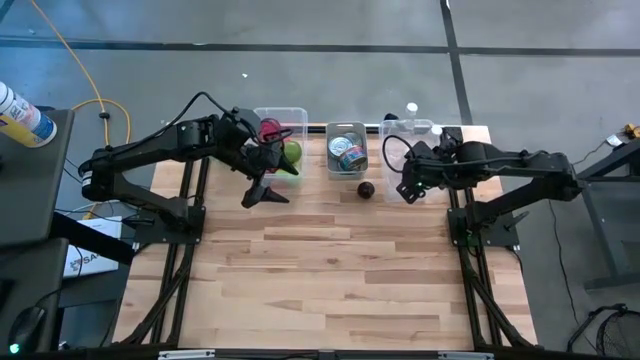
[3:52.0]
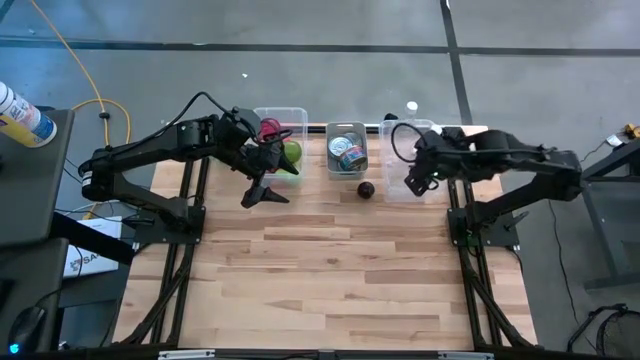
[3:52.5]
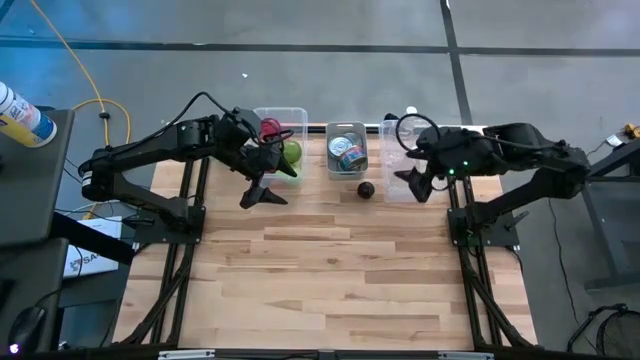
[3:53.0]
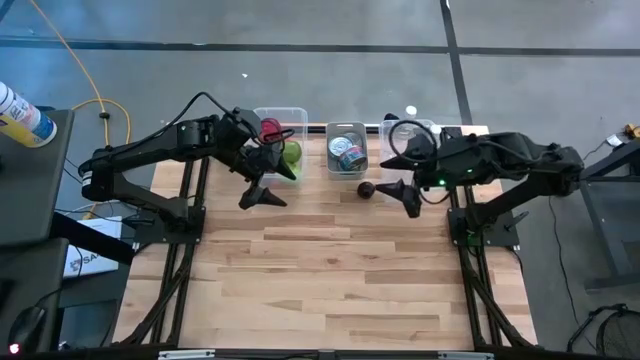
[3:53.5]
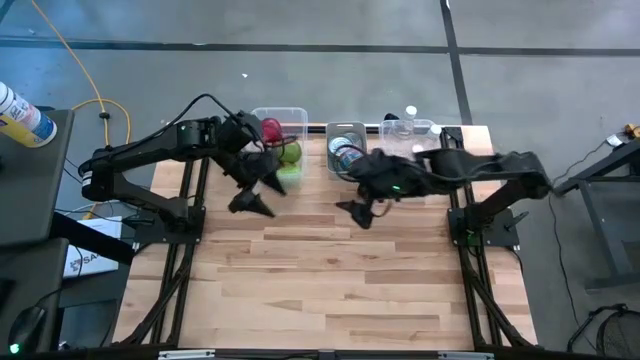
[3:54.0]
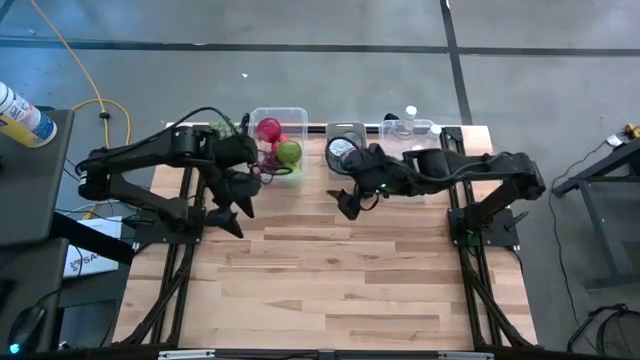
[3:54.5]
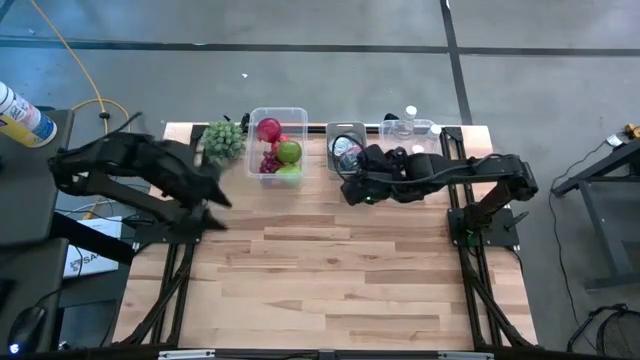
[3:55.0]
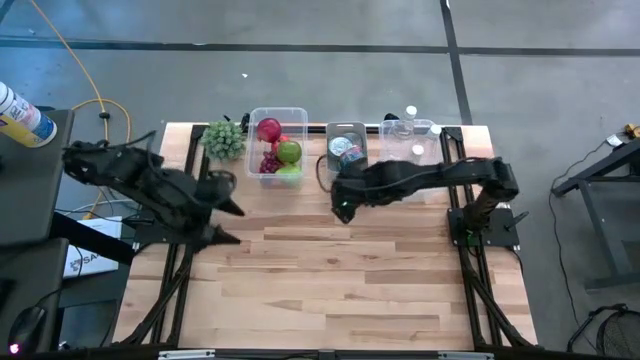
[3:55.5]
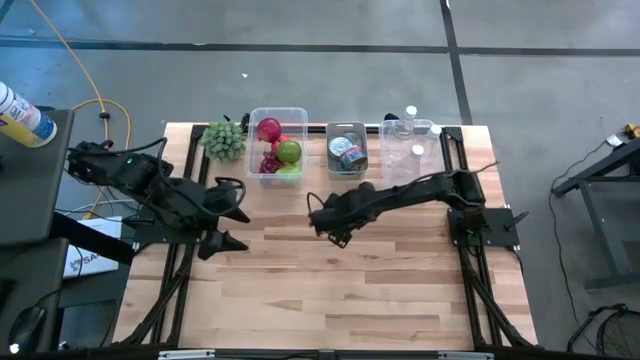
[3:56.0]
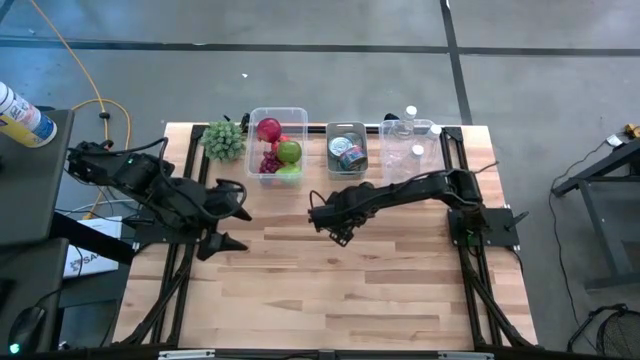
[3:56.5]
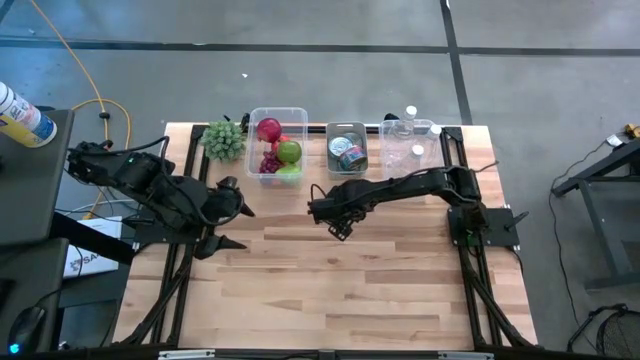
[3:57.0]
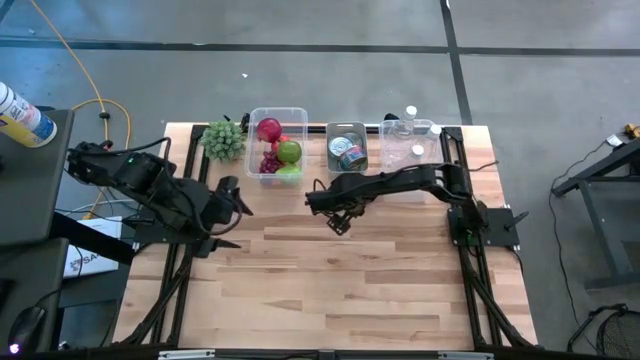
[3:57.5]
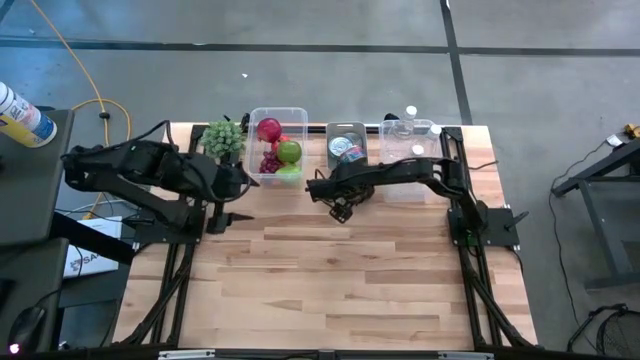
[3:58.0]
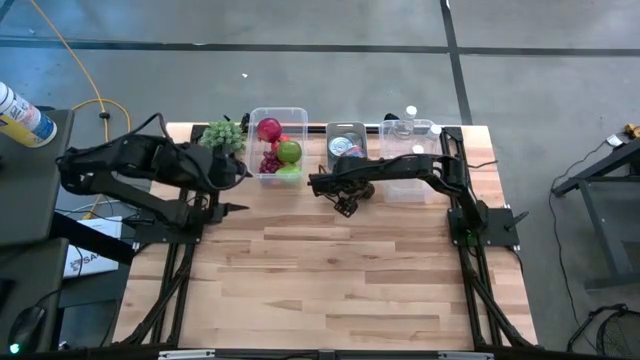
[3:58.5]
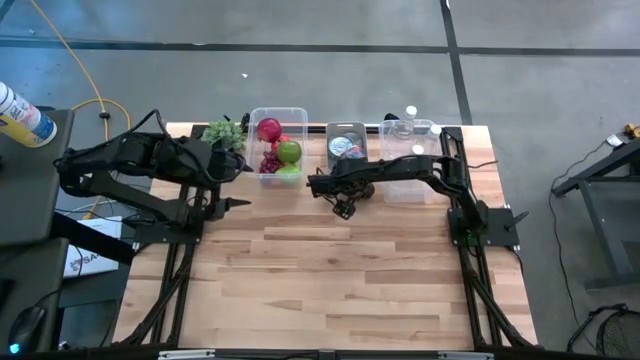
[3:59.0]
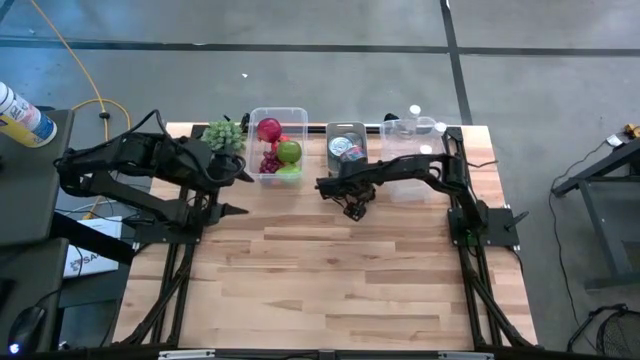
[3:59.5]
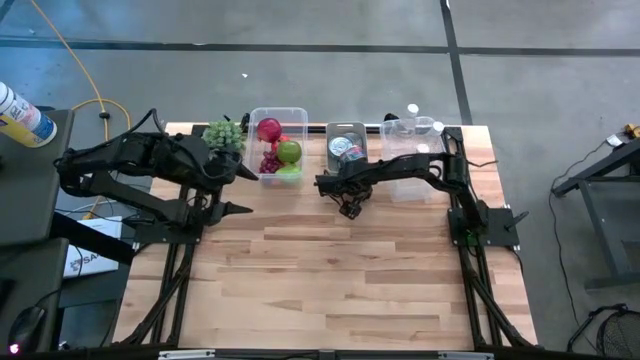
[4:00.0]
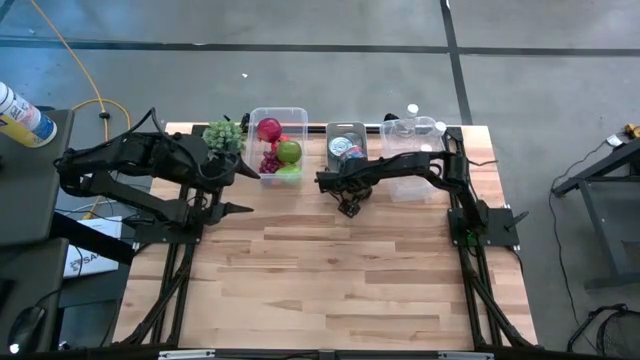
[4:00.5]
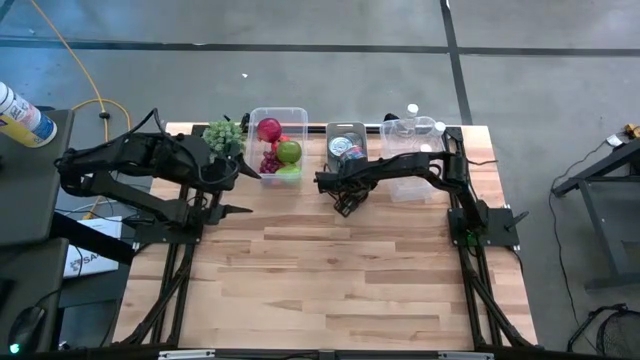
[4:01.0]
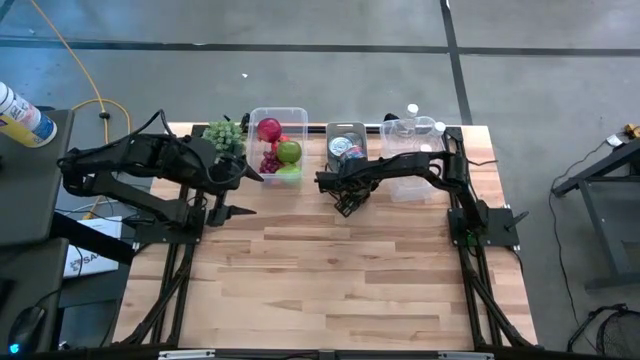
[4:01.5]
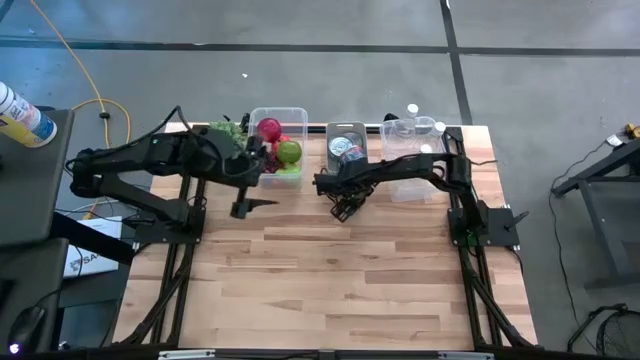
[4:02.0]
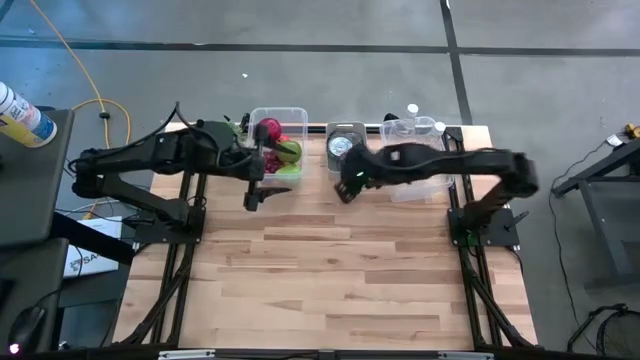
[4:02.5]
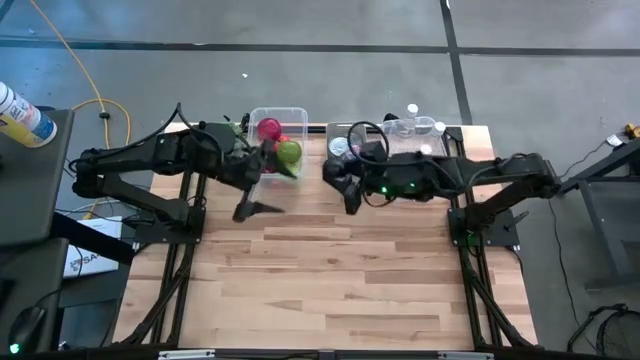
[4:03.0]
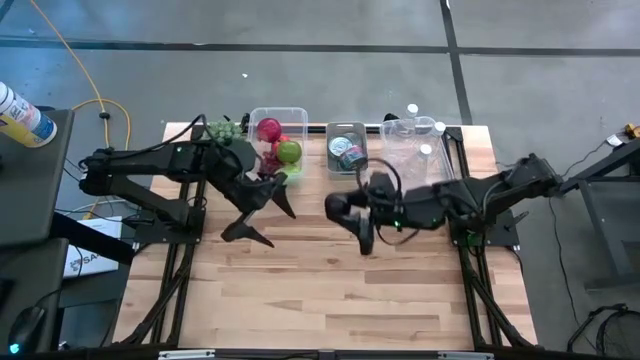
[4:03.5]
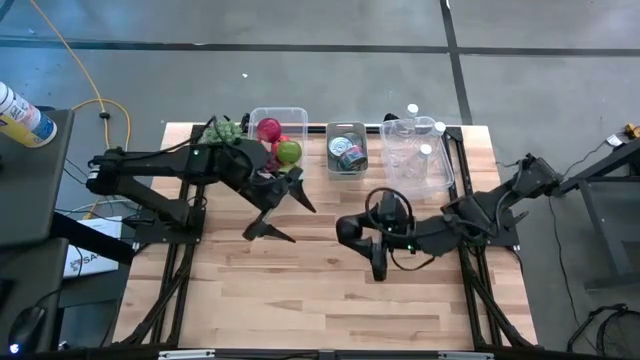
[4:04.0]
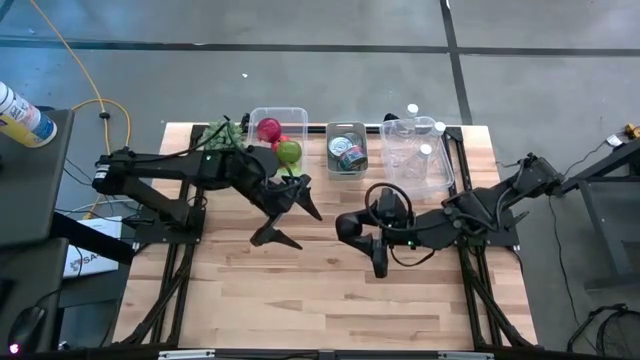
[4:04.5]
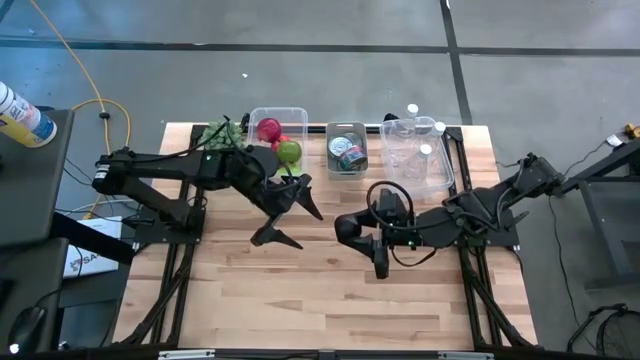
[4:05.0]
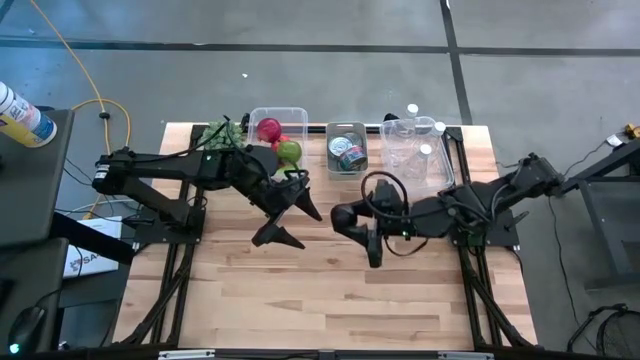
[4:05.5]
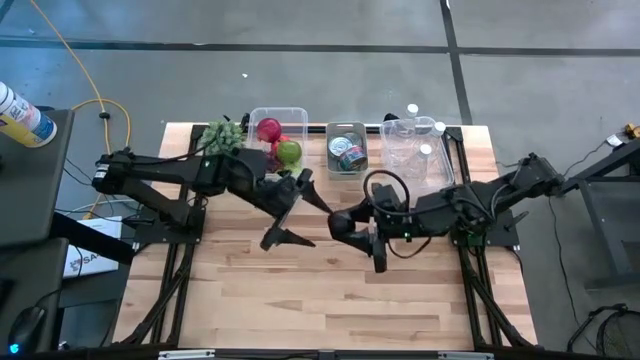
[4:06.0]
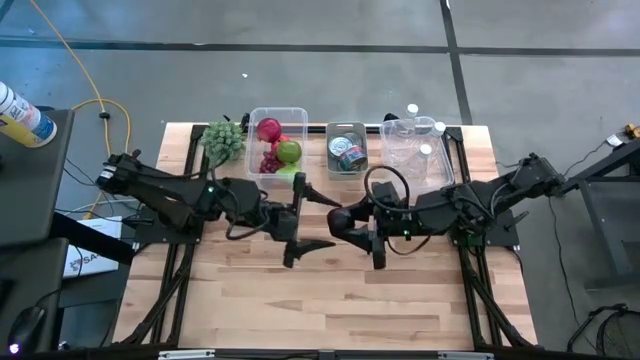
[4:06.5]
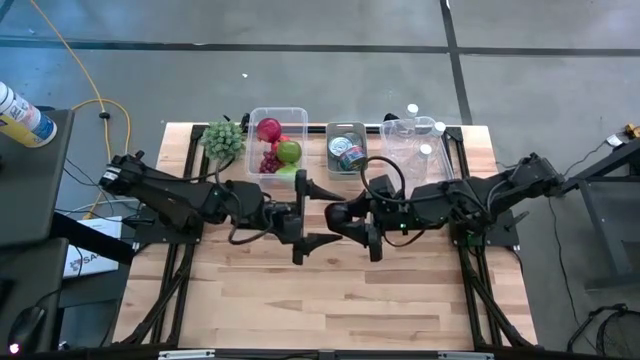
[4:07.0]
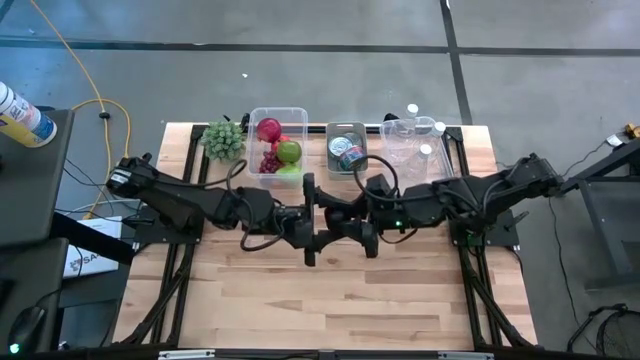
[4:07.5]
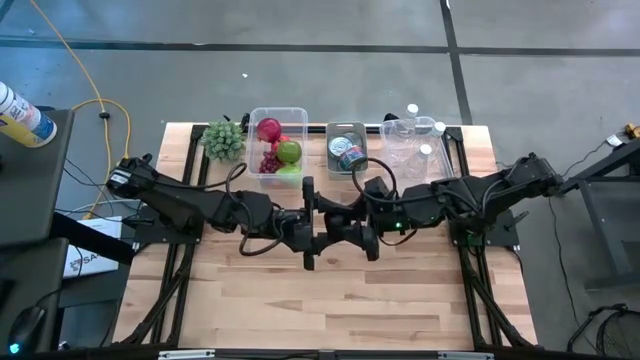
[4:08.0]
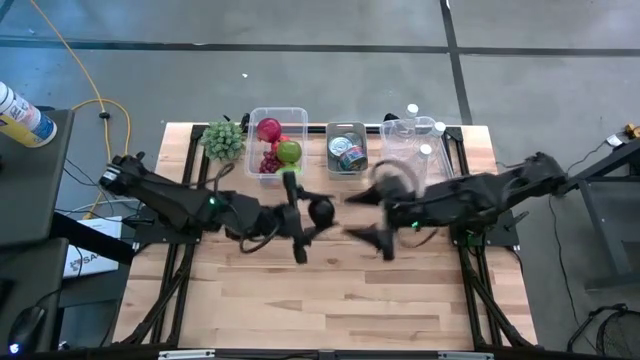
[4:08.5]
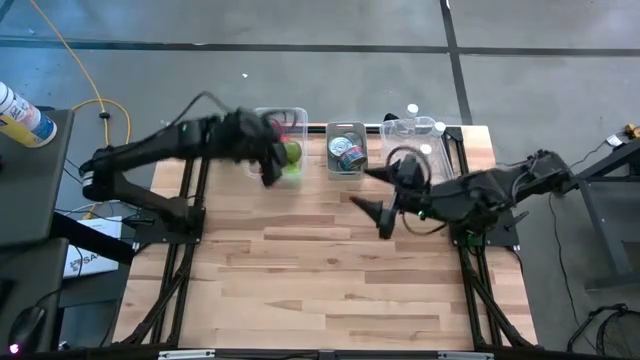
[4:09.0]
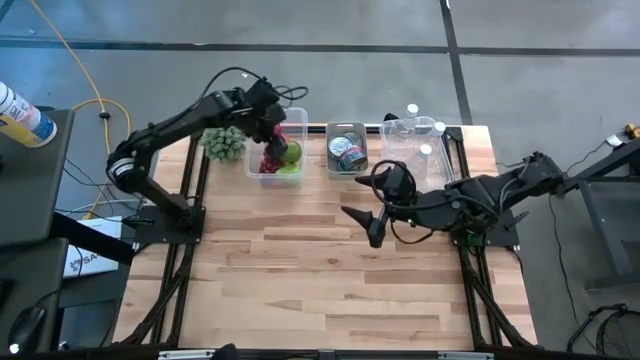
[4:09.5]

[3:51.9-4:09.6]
Task: Pick & Place Food Item
Put the plum into the left transparent bin
